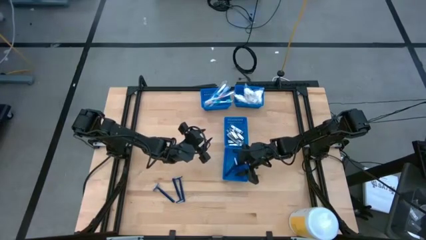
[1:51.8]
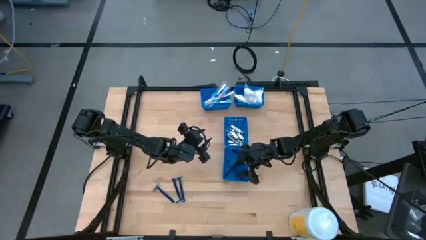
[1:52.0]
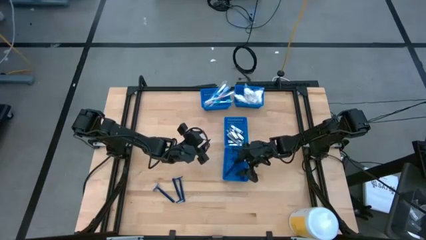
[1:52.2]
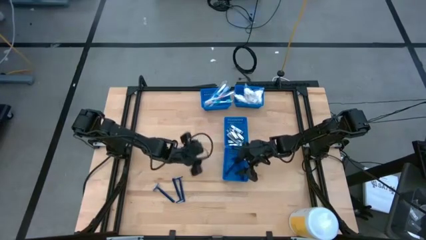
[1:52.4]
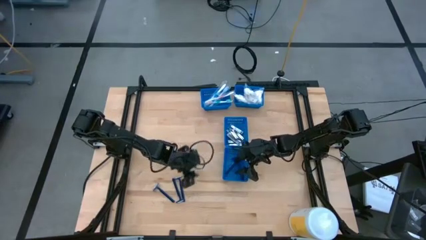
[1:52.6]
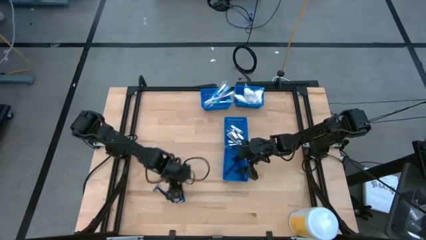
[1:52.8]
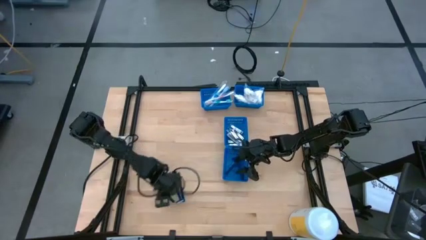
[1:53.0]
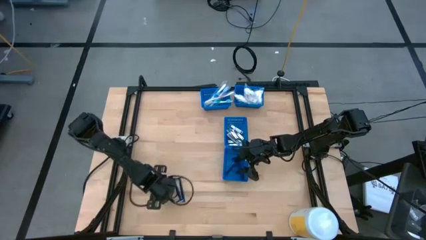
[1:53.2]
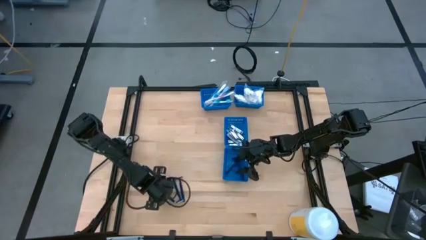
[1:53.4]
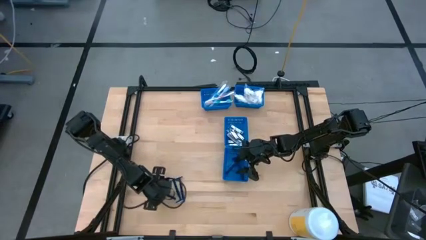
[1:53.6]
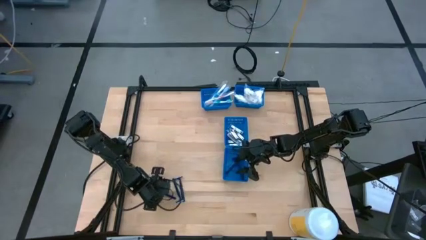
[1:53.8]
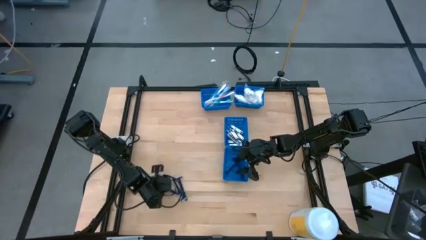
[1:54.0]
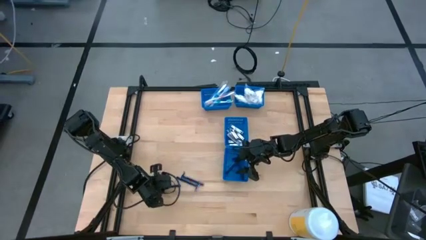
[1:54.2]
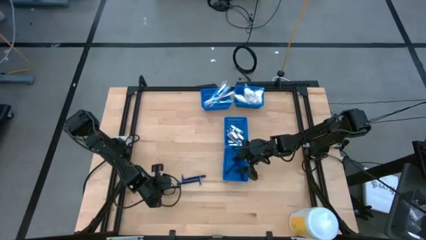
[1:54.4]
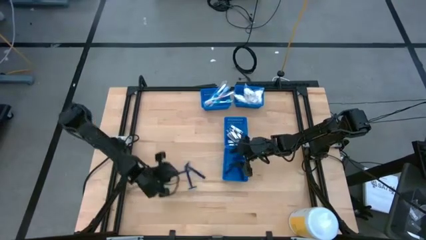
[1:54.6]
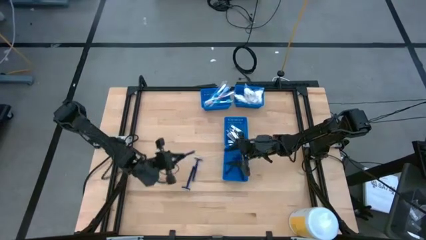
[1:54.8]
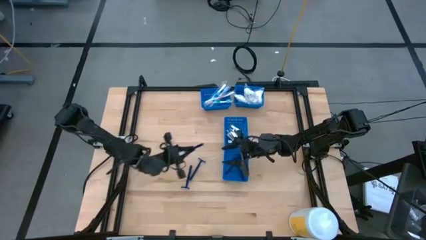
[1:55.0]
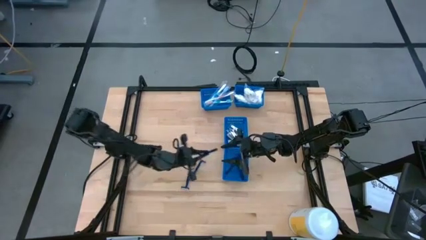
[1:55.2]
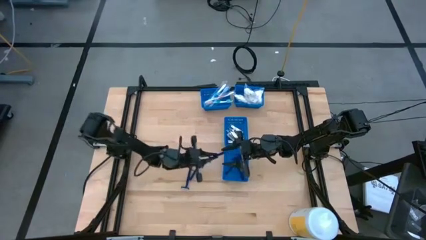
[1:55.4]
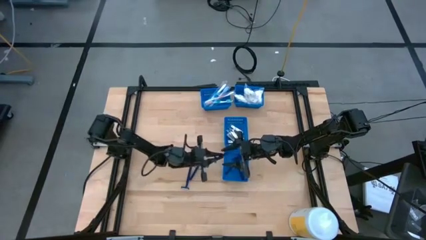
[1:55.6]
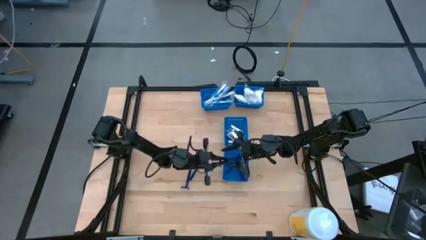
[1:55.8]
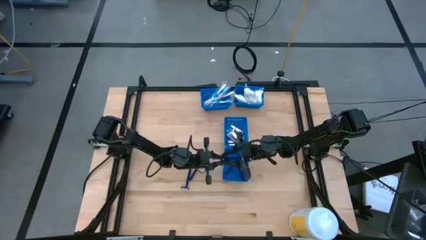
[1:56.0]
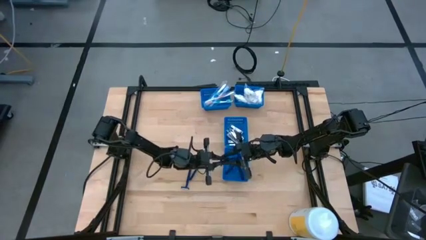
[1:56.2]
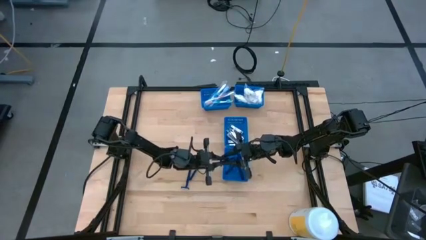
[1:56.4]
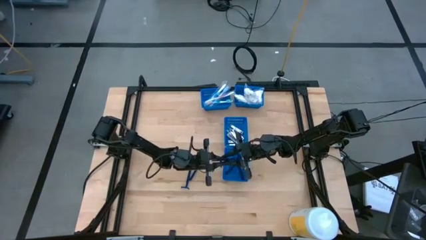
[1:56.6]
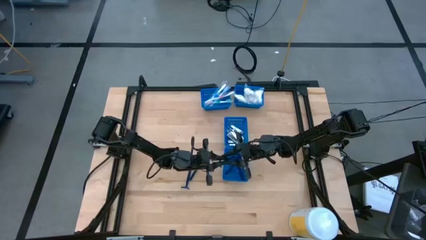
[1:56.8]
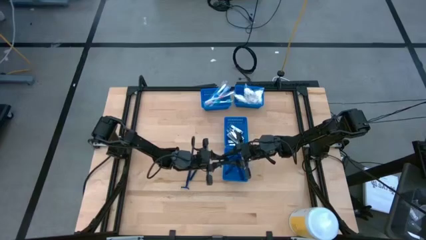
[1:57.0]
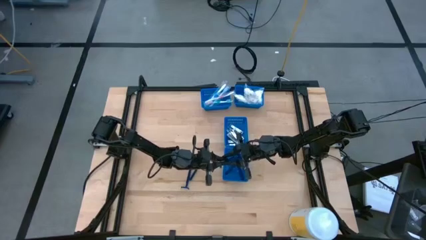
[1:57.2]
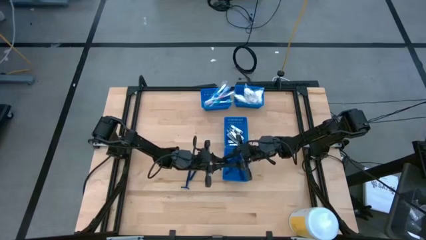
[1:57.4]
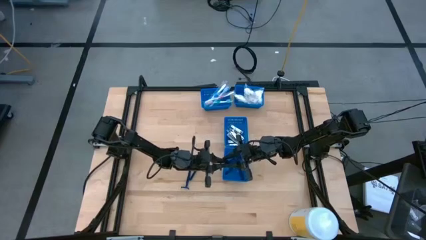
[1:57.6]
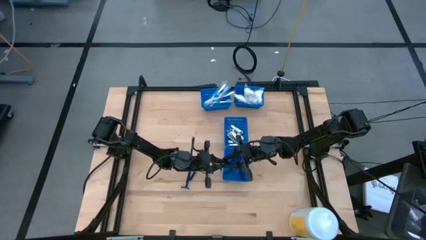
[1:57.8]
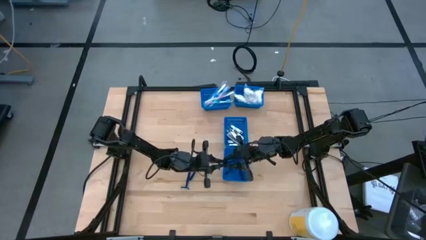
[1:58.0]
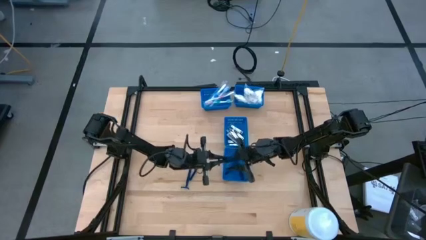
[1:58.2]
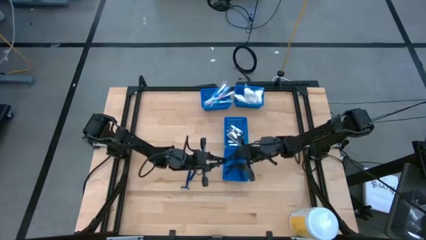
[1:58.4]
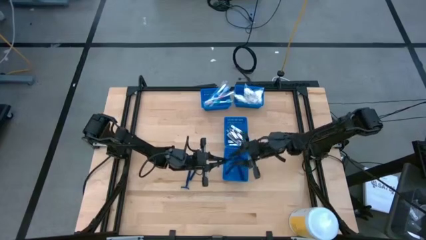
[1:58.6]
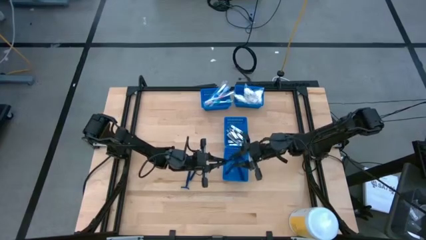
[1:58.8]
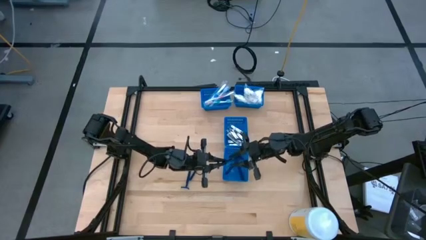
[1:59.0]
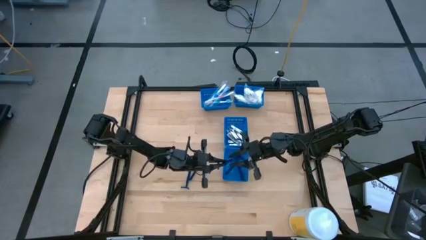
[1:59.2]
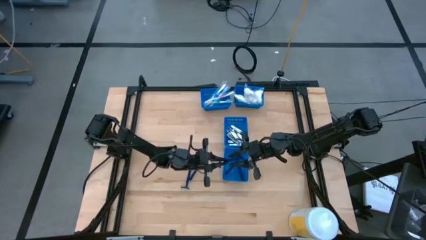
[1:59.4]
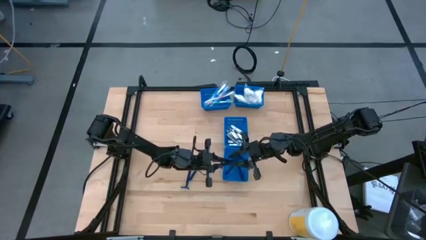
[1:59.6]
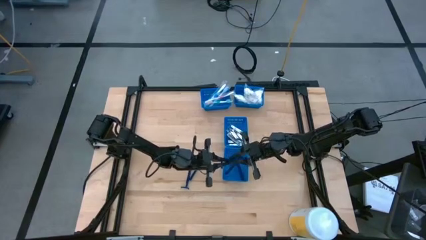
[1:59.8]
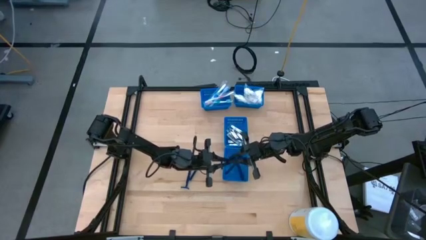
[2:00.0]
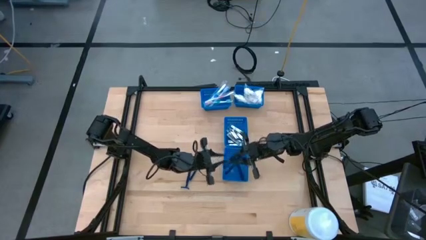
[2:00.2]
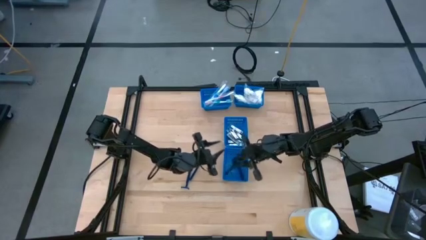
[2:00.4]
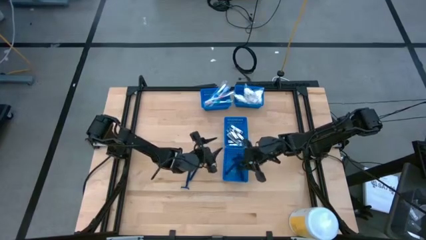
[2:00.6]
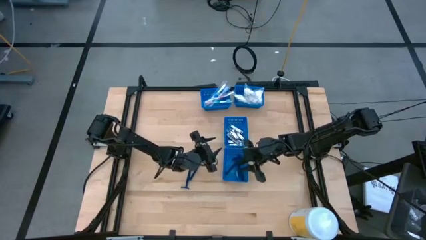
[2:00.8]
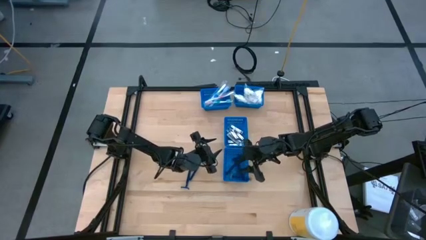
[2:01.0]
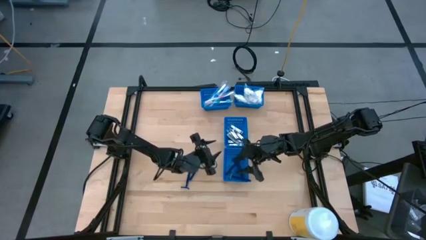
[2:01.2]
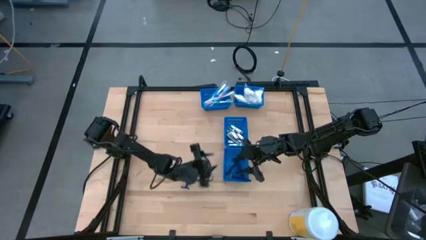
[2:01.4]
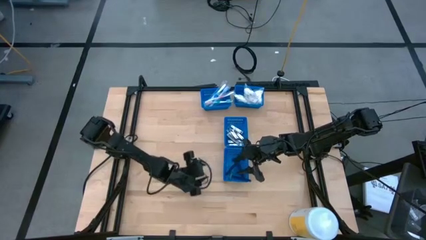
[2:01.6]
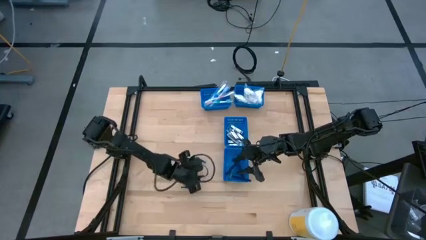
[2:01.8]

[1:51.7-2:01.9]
Task: Pick & Place Travel size toiletries
Put the blue safety razor in the bottom blue bin

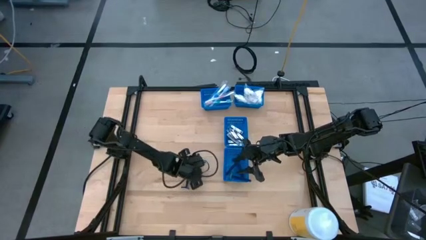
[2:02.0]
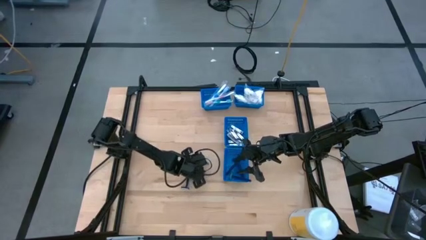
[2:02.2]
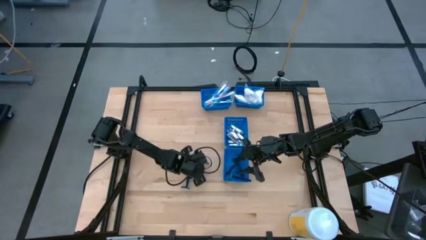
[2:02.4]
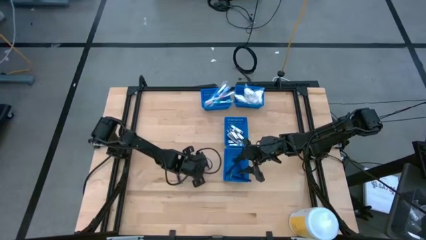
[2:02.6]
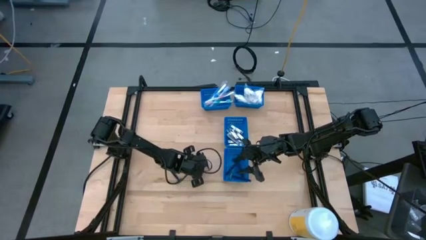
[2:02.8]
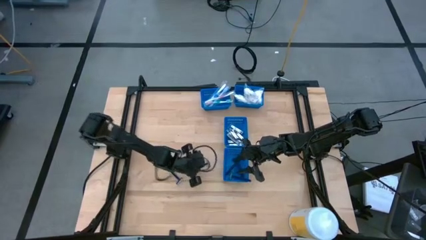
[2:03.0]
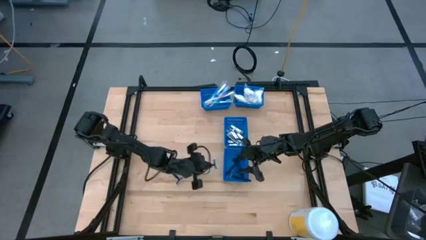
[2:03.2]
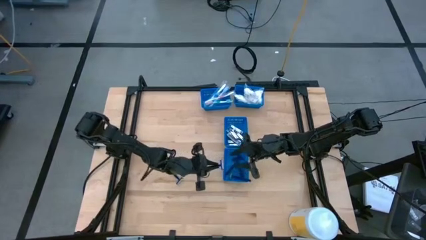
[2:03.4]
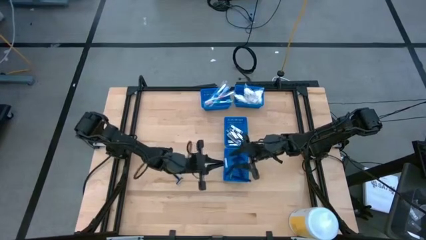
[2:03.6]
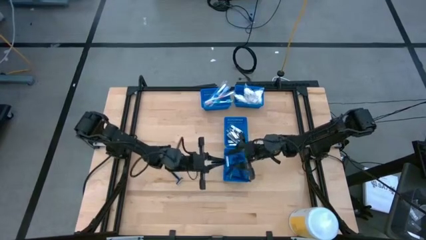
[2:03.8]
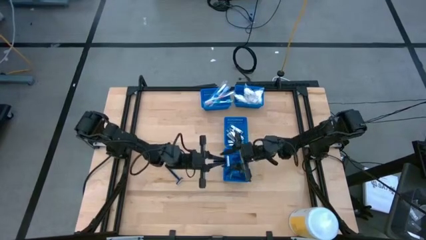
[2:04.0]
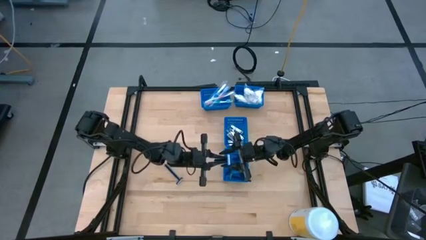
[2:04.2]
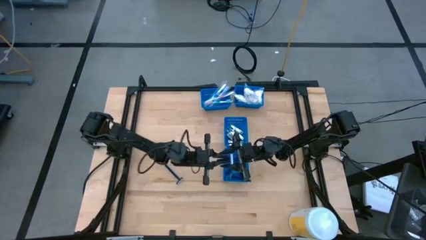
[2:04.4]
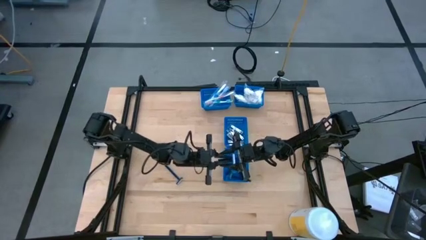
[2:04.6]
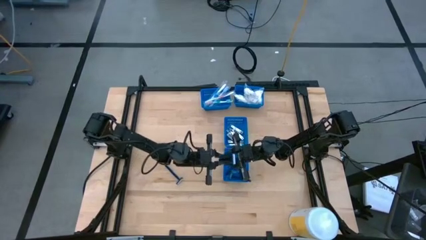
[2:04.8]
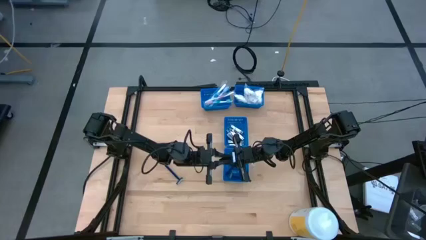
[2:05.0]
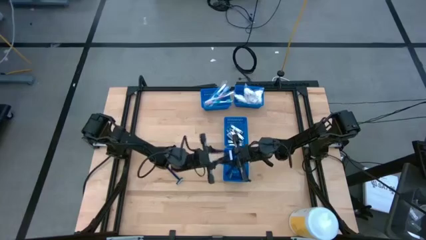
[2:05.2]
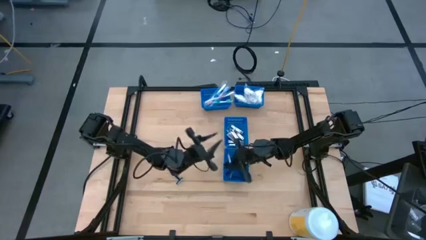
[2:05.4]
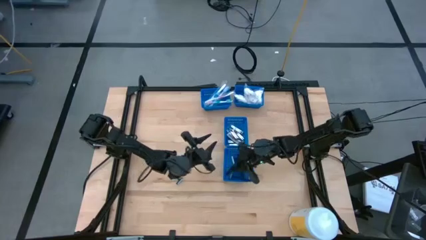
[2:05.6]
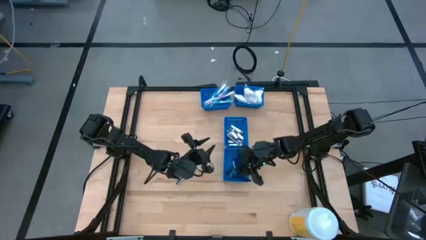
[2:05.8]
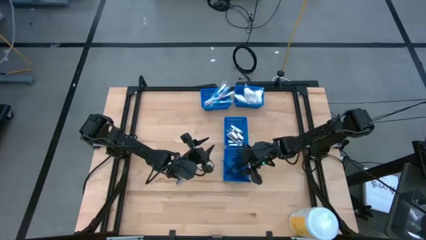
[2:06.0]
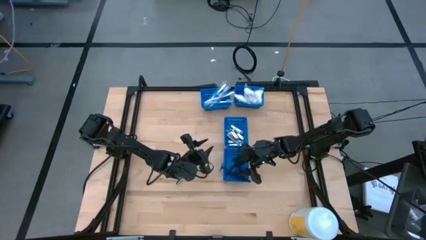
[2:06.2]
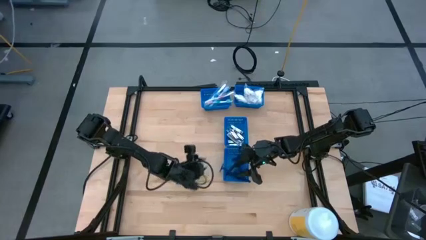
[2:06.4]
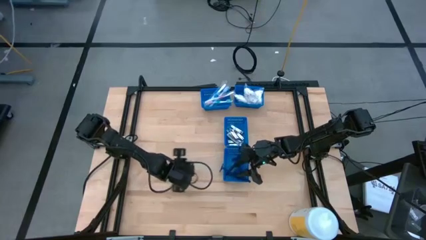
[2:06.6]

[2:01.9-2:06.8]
Put the blue safety razor in the bottom blue bin

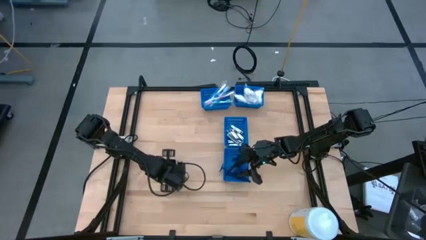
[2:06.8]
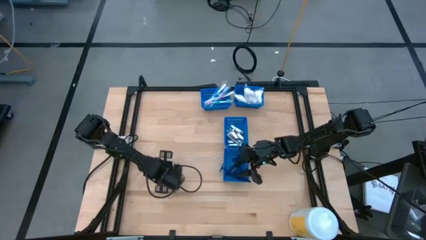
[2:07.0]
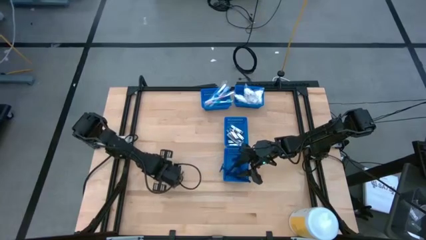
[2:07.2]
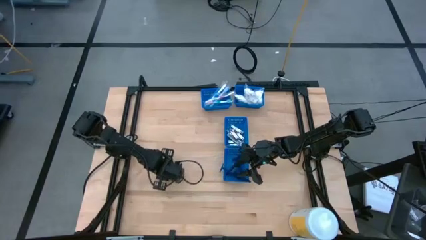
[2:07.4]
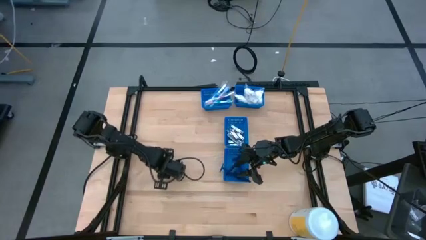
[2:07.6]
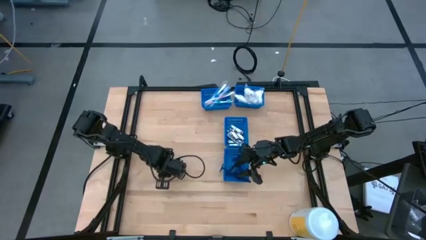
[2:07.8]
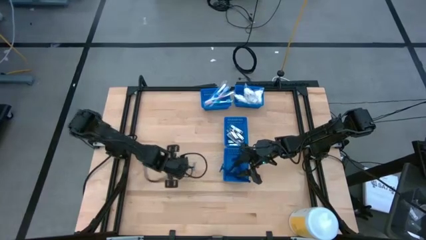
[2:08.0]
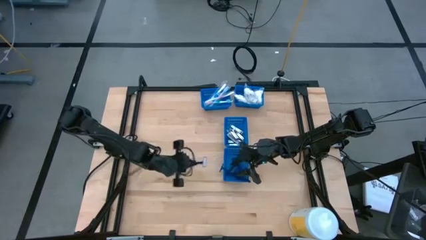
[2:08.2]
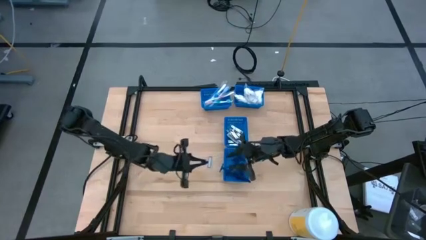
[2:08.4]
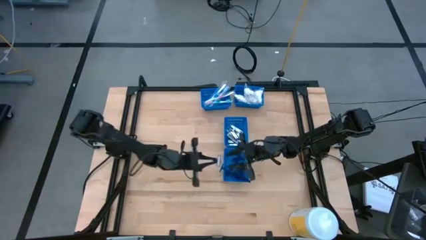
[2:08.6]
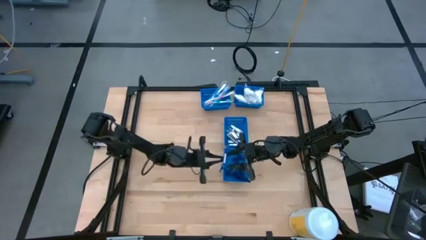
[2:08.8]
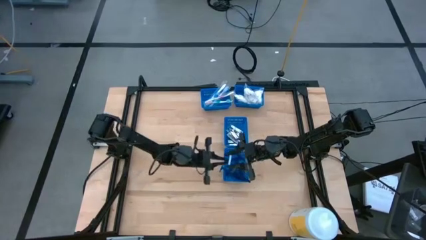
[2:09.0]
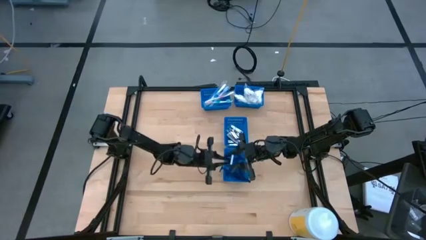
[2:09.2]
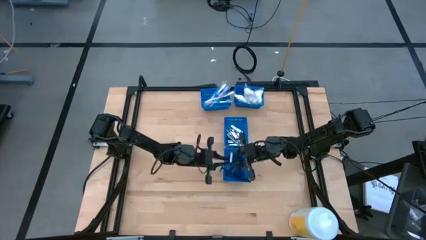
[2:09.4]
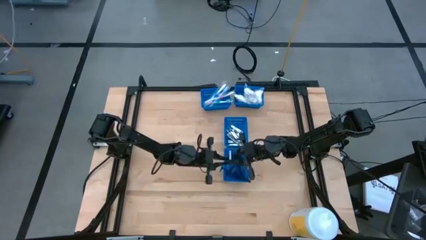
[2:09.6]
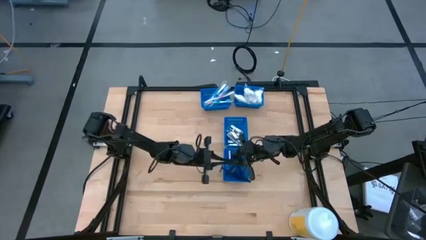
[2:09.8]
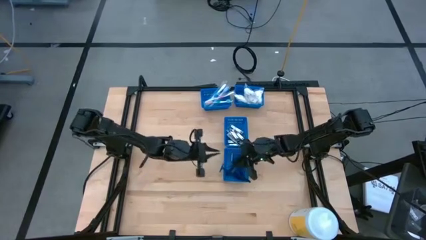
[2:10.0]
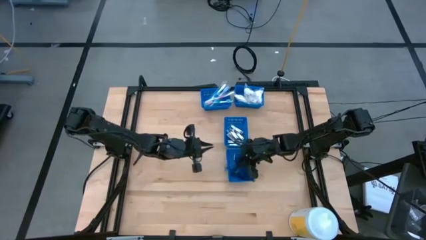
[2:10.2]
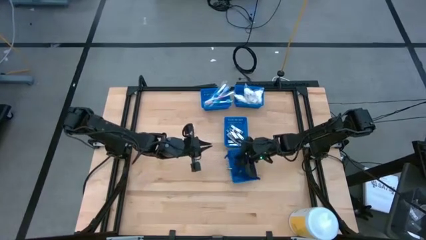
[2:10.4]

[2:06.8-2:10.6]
Put the blue safety razor in the bottom blue bin
